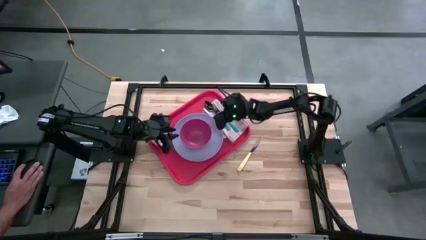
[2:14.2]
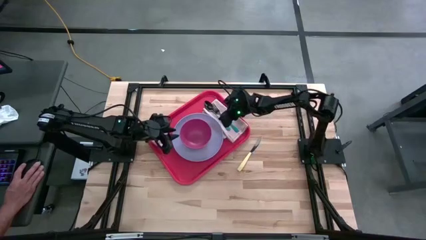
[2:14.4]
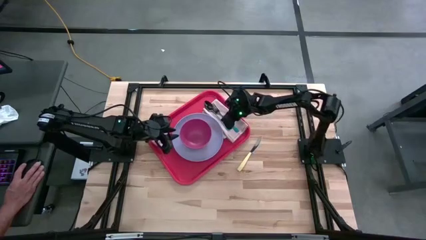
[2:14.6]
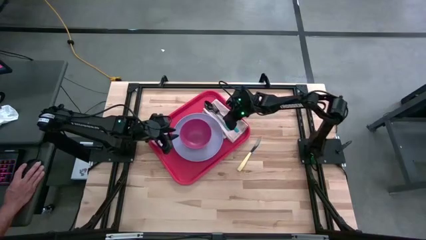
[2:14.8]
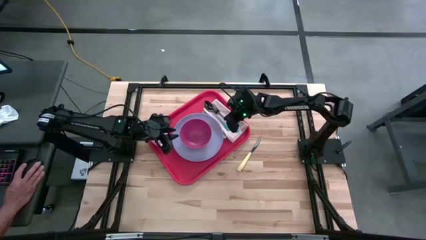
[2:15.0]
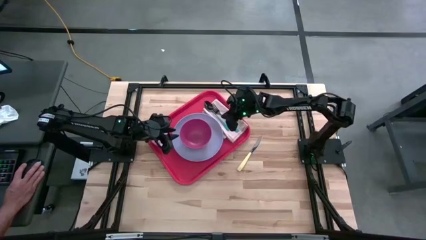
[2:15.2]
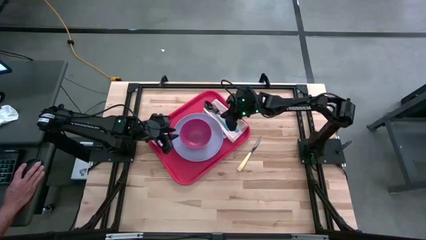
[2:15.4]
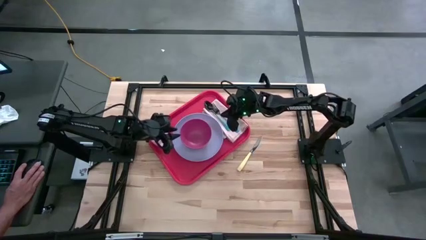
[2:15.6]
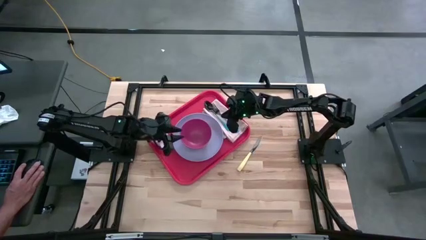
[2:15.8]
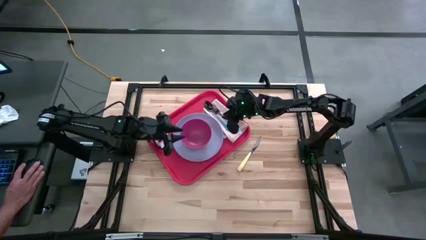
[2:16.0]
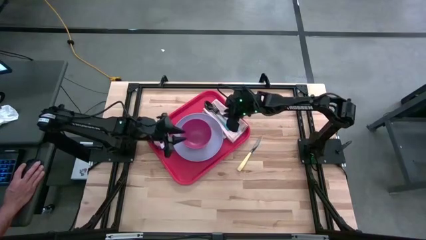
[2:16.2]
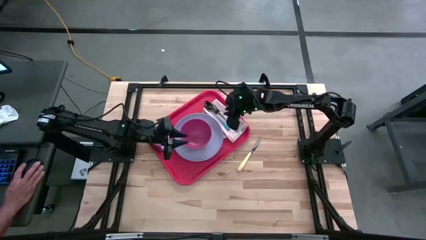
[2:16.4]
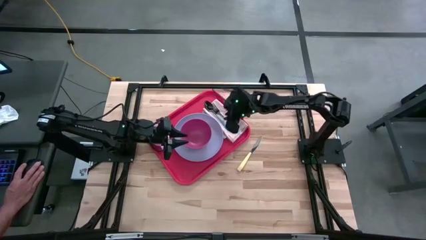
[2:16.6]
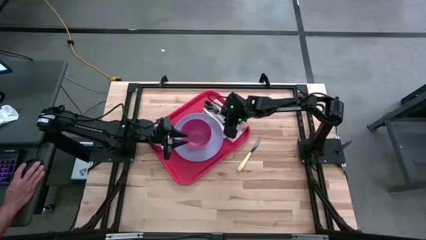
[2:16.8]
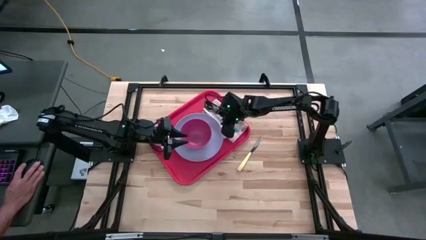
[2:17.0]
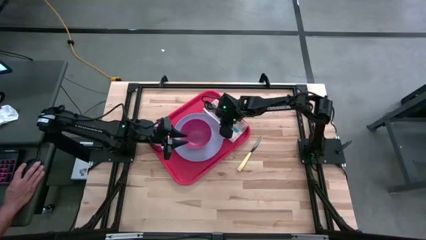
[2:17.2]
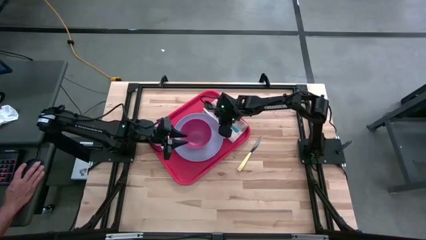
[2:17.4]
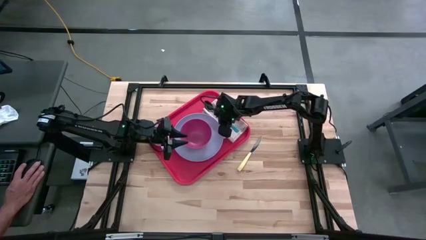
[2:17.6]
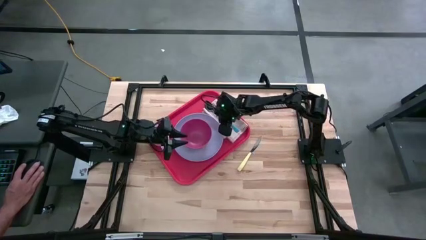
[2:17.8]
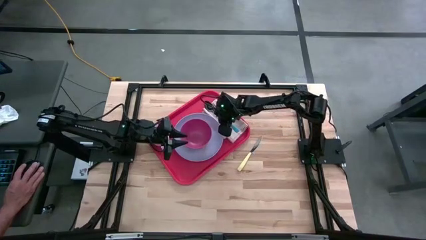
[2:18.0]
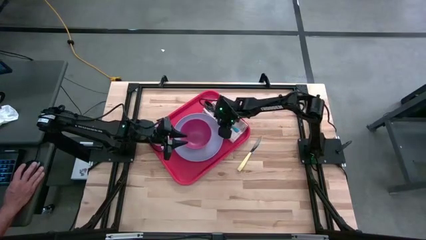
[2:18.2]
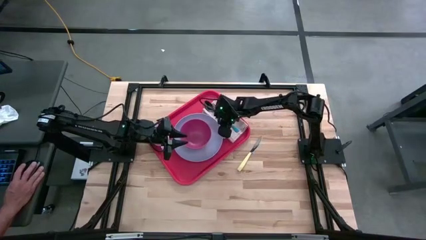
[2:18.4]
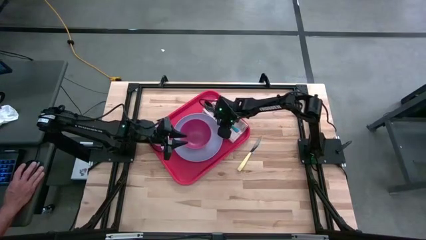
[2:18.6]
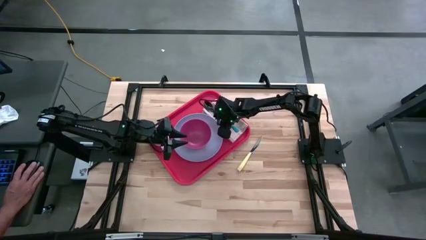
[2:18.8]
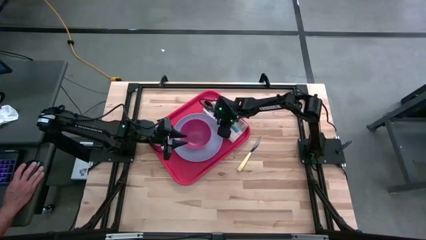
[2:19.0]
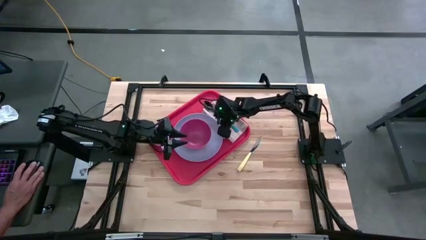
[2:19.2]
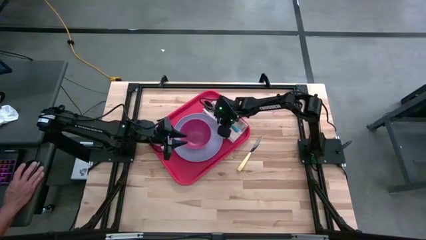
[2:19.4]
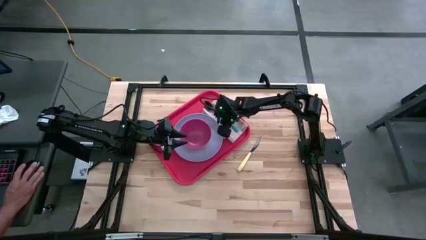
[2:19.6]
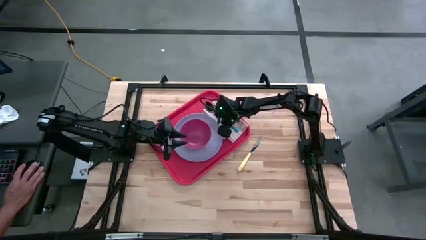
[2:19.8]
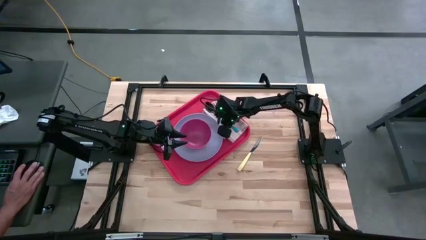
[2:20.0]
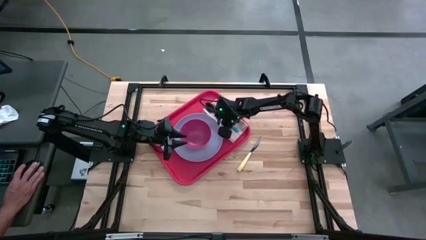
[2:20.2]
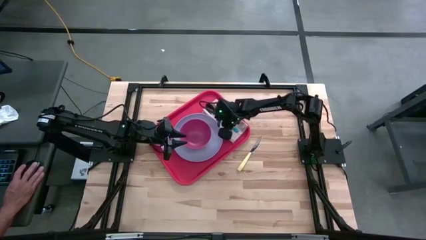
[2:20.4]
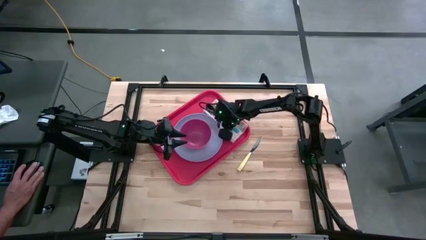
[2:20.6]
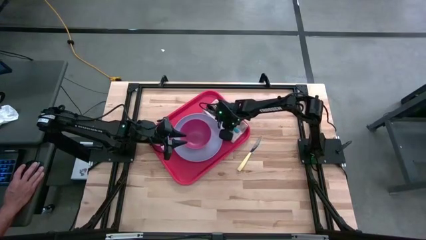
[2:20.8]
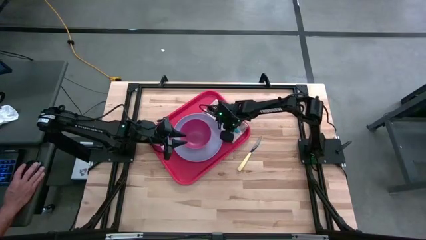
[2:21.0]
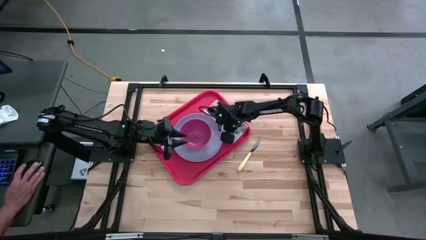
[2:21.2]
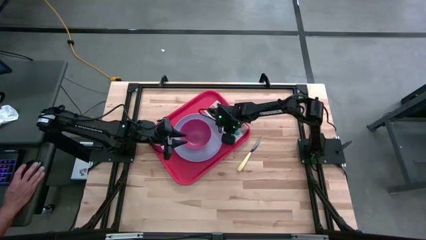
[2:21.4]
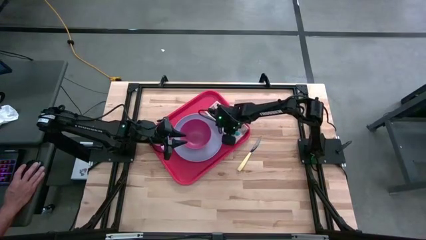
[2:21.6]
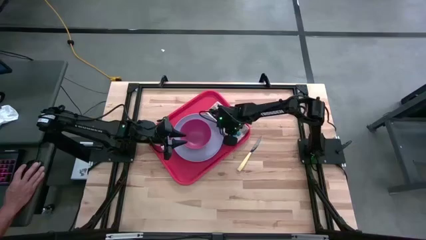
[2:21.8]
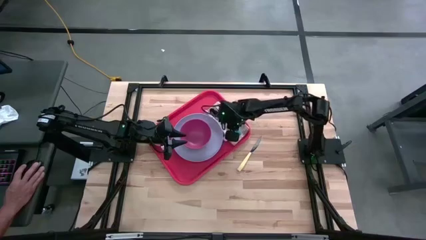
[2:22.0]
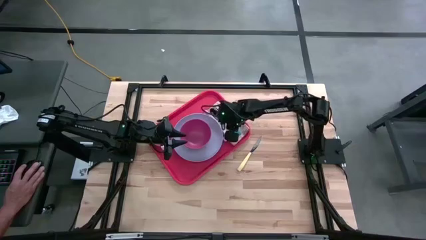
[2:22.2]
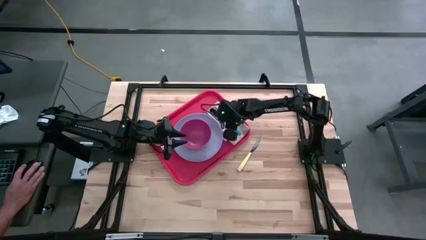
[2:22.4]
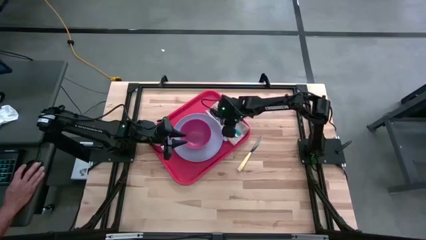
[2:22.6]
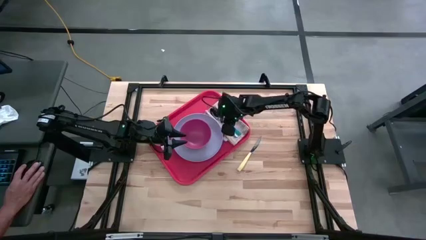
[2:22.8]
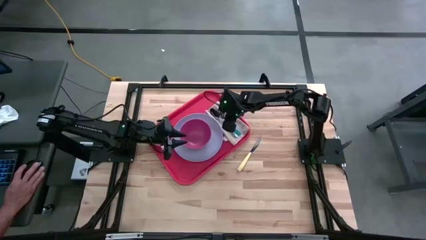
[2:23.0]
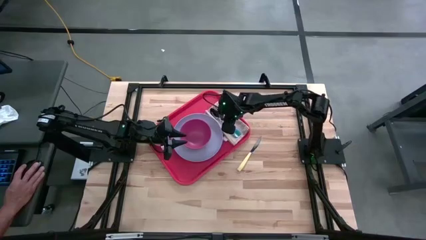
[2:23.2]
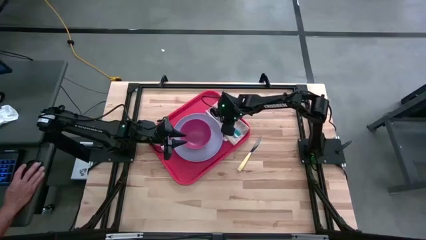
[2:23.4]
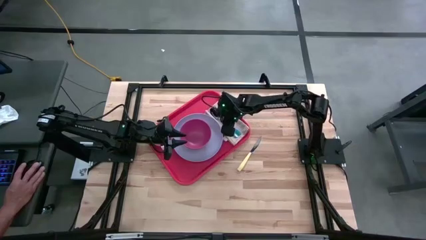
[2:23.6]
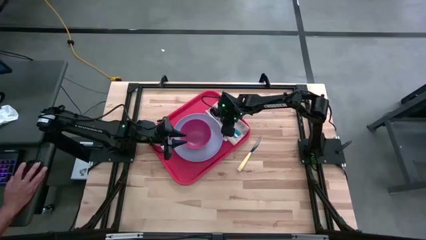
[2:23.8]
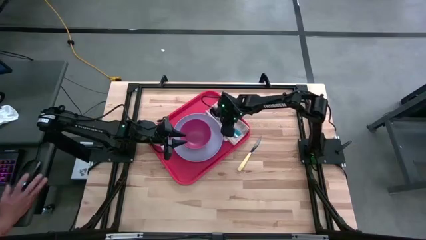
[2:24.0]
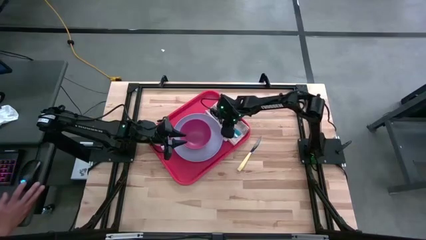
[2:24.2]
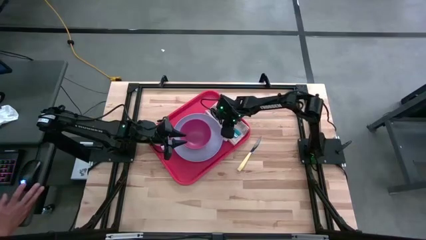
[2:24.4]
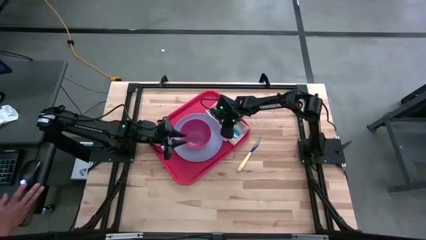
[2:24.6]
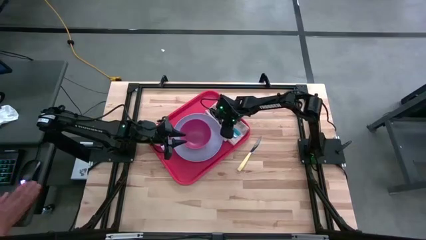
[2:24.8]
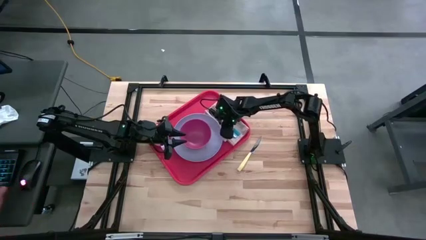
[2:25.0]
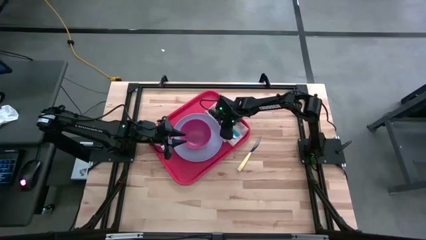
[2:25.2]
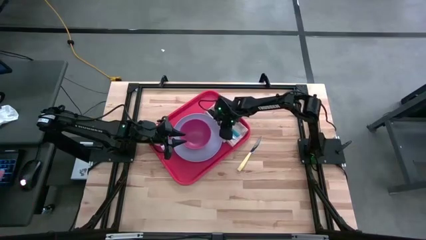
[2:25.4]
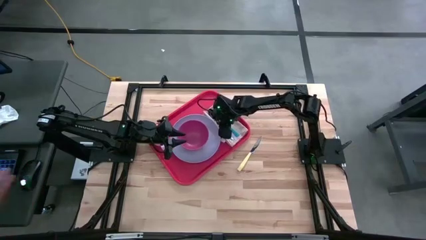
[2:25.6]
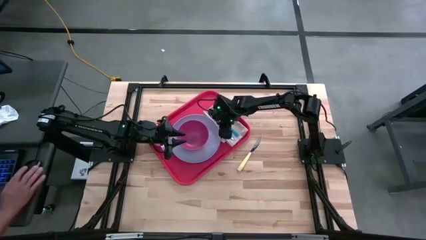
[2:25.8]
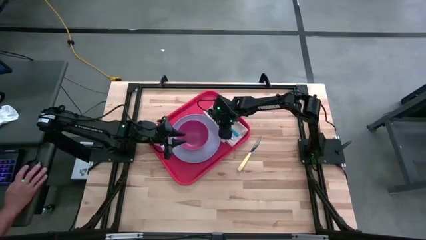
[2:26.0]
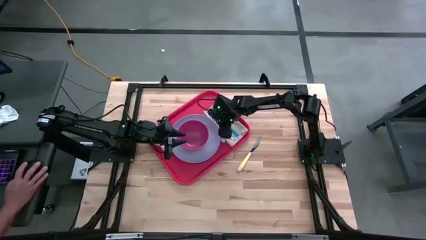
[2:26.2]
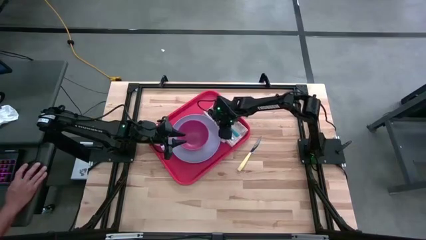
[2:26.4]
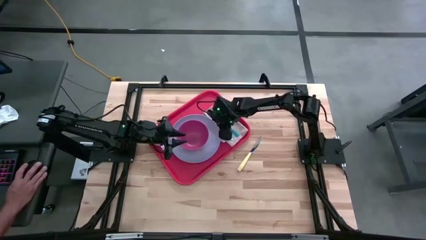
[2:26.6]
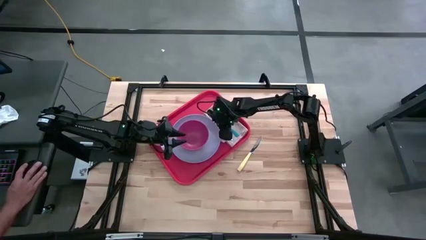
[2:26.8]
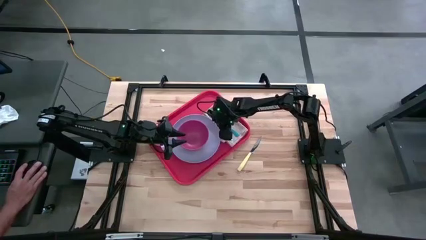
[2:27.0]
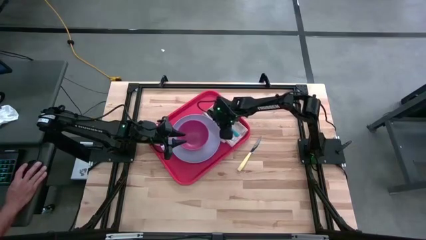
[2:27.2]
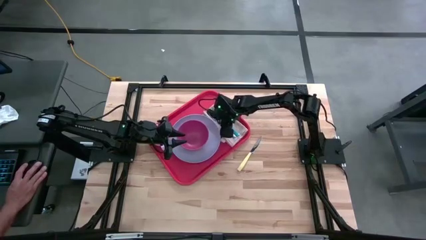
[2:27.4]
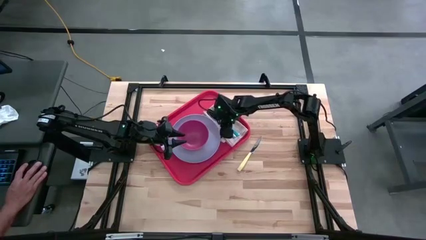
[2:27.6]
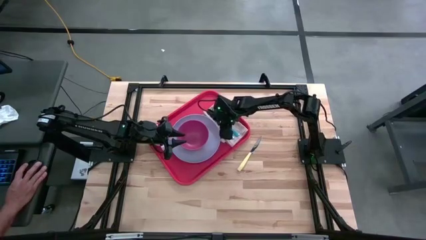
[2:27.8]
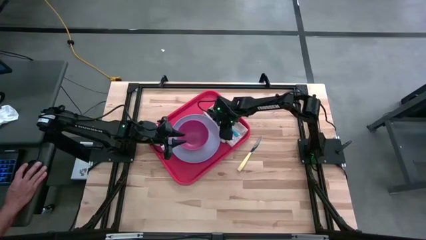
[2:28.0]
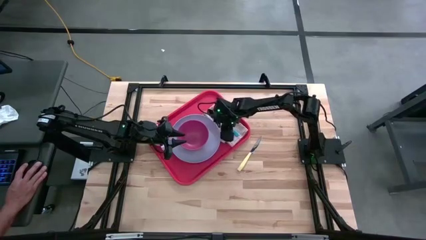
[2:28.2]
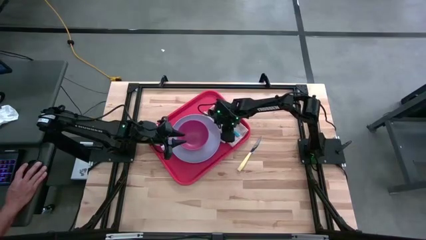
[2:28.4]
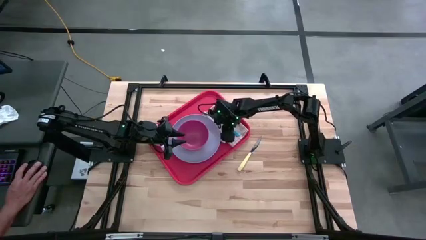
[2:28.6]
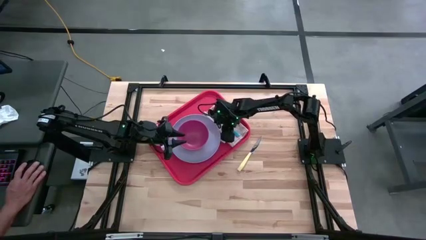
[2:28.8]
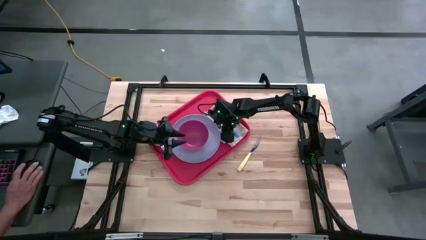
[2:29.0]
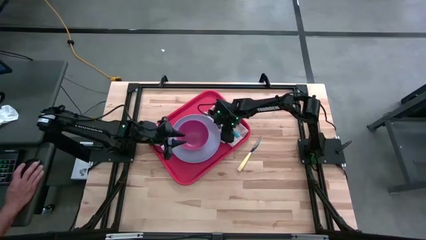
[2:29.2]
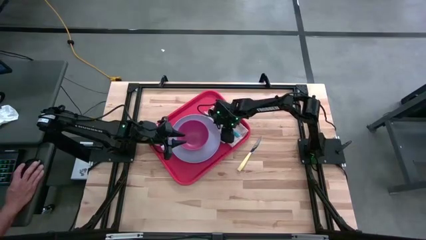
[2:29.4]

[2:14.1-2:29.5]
Task: Set up tray
Put the blue spoon on top of the brown table napkin to the left of the blue fork on the red serving tray

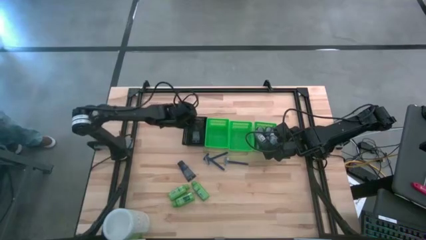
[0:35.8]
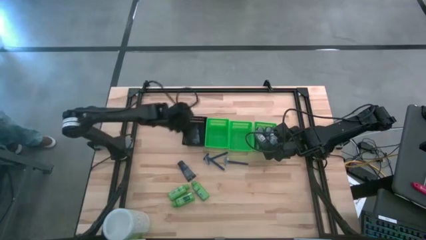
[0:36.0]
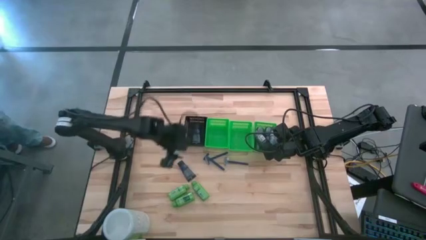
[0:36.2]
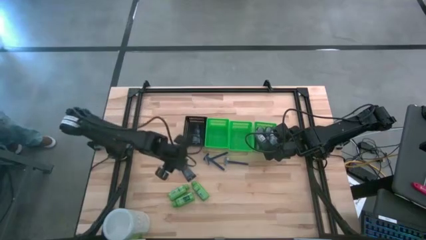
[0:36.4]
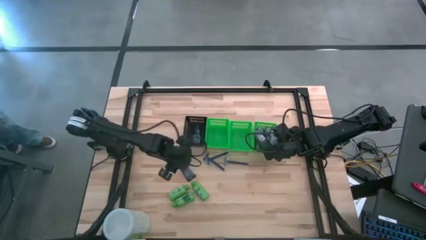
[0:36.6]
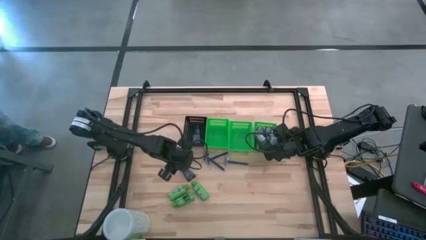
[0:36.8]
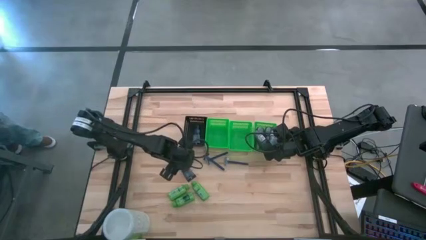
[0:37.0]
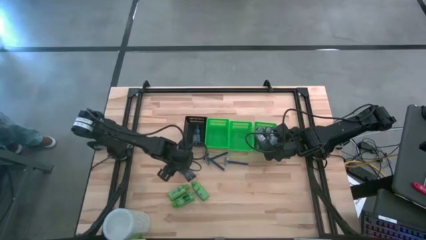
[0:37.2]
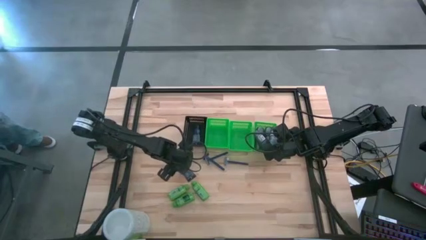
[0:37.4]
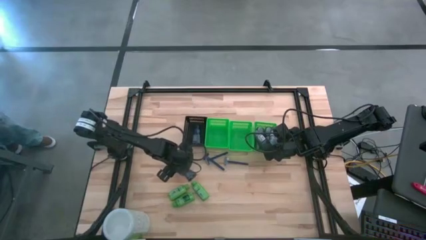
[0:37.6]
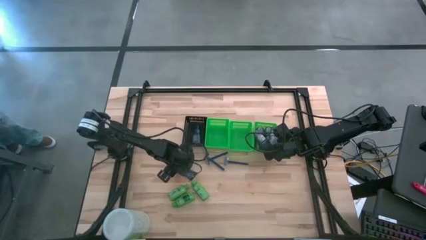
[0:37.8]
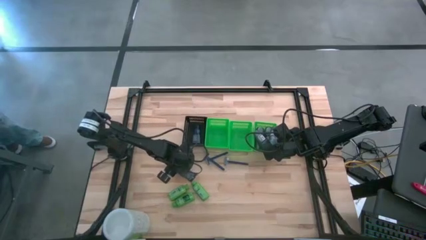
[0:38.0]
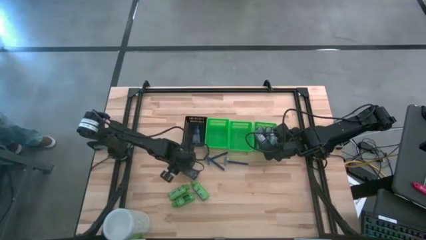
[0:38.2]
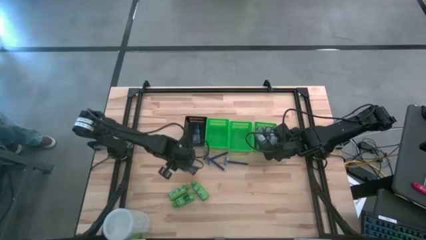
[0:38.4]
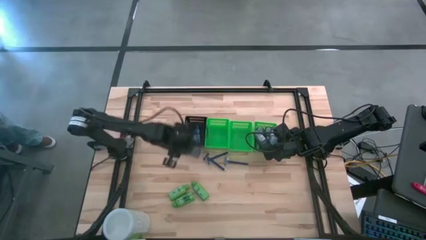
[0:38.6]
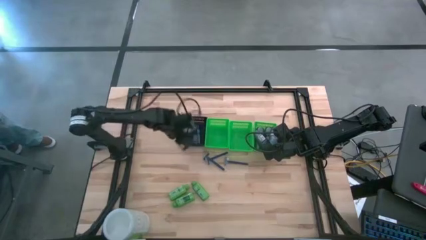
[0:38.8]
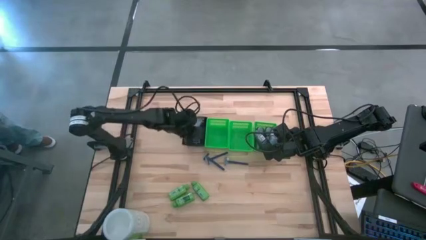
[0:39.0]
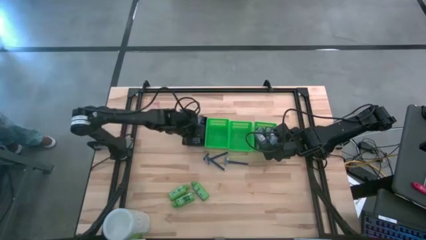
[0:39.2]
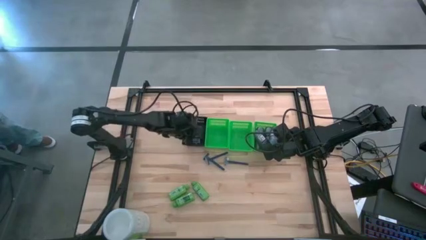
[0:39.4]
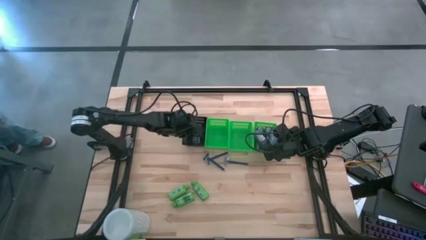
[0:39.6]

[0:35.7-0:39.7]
Task: Pick & Place Travel size toiletries
Put the blue shave cream into the black basket
